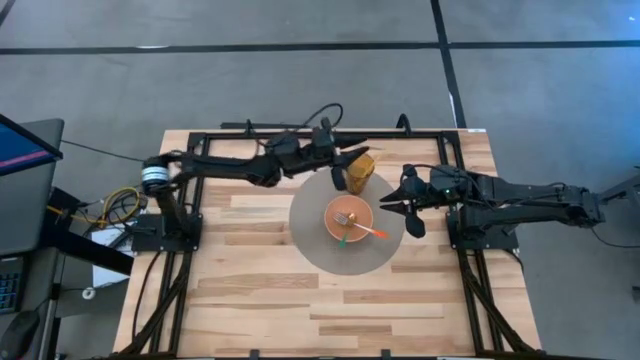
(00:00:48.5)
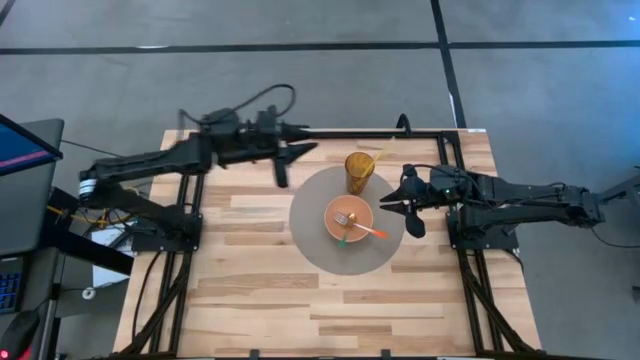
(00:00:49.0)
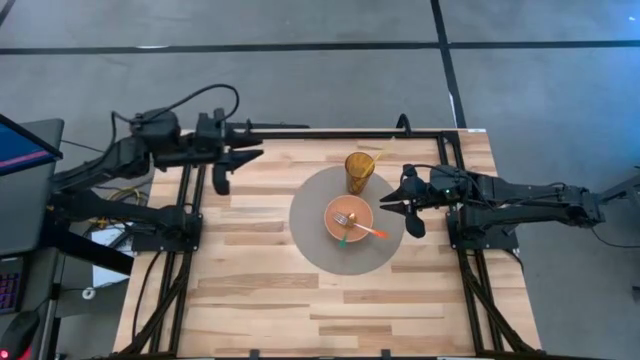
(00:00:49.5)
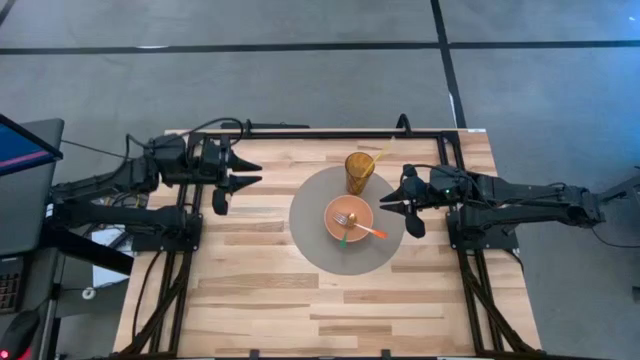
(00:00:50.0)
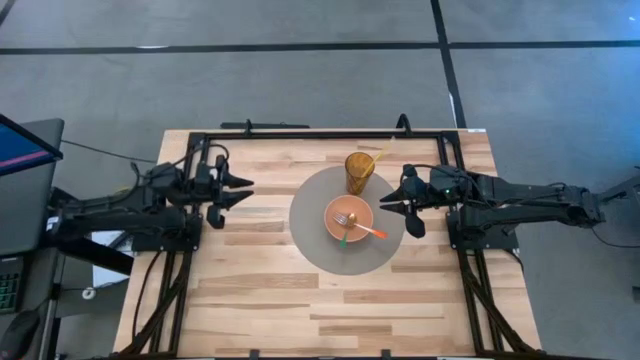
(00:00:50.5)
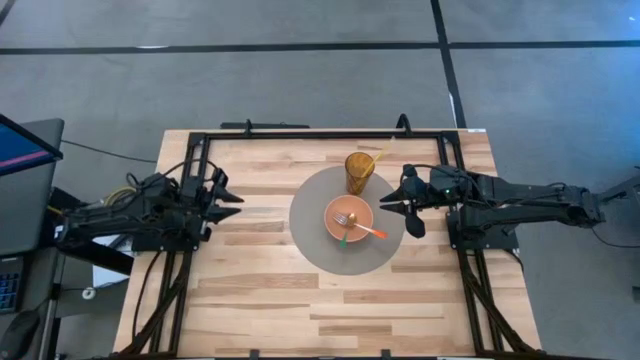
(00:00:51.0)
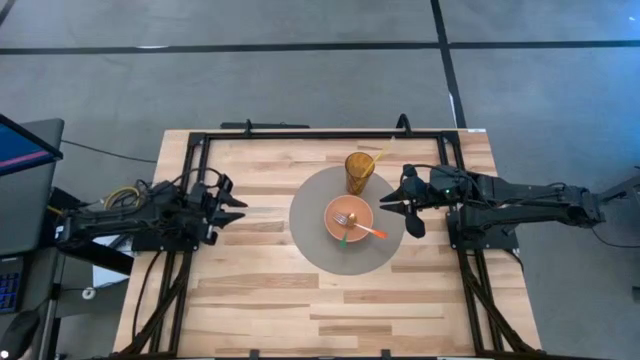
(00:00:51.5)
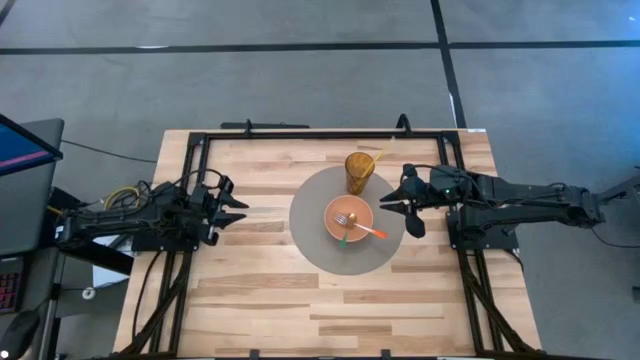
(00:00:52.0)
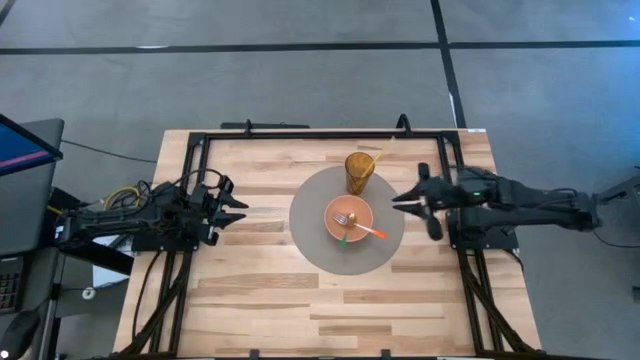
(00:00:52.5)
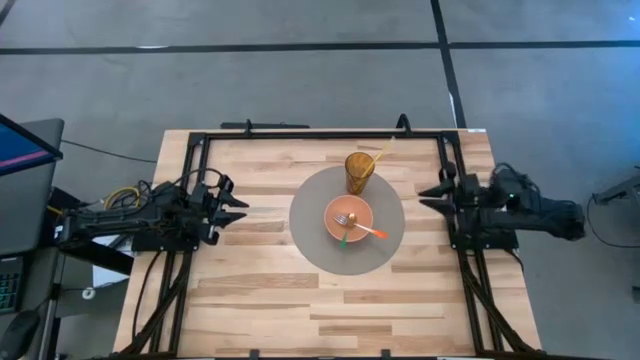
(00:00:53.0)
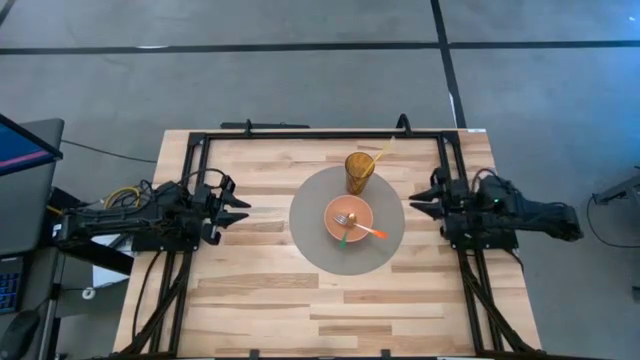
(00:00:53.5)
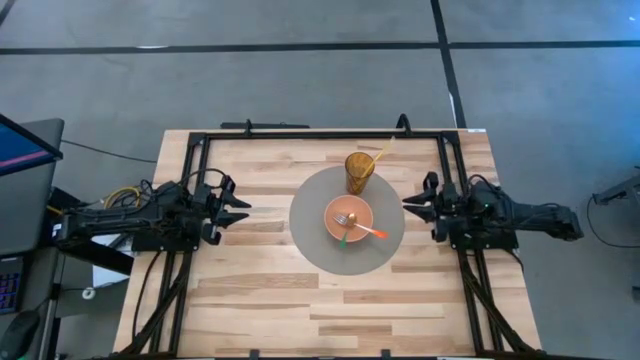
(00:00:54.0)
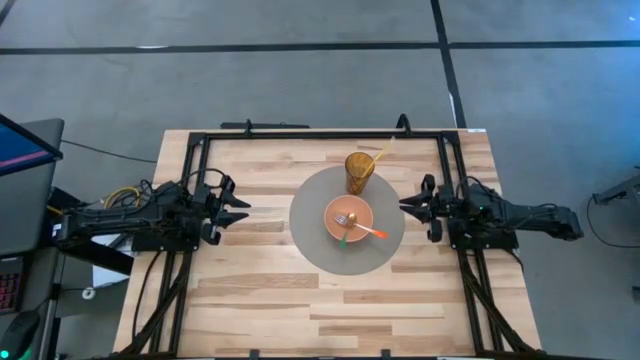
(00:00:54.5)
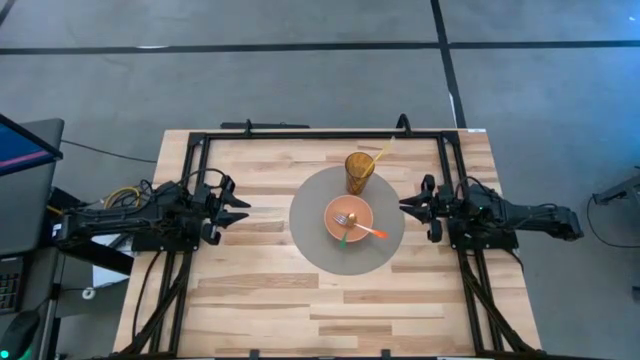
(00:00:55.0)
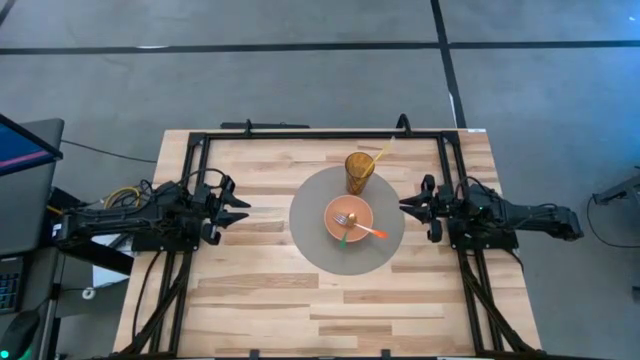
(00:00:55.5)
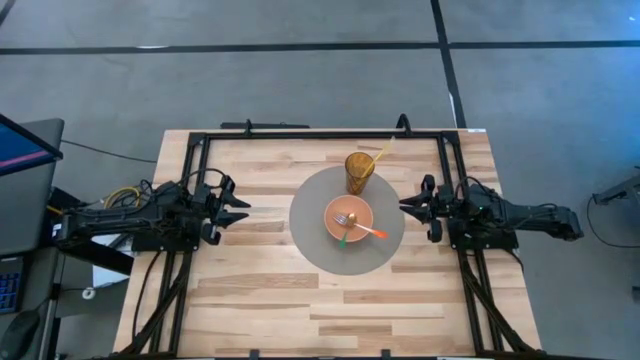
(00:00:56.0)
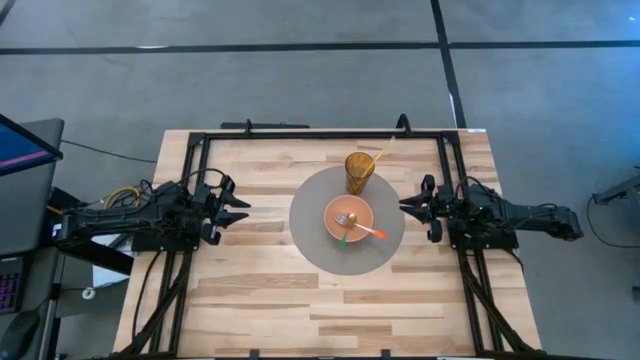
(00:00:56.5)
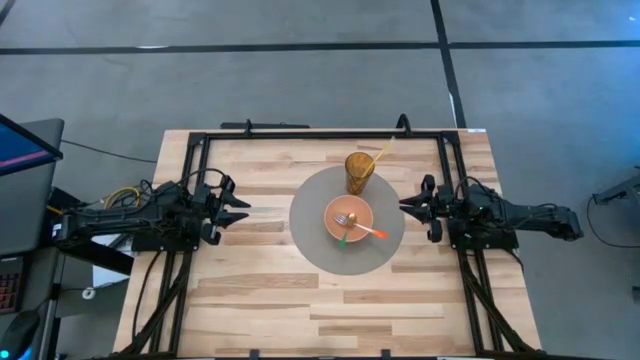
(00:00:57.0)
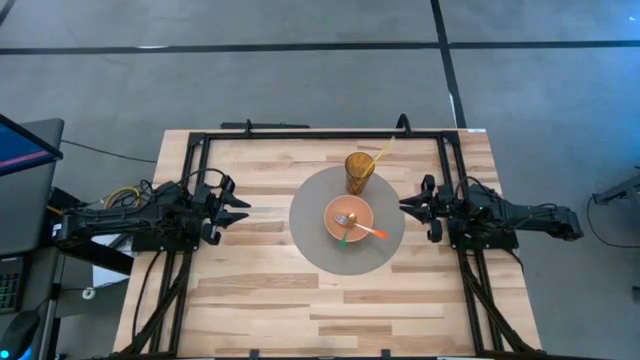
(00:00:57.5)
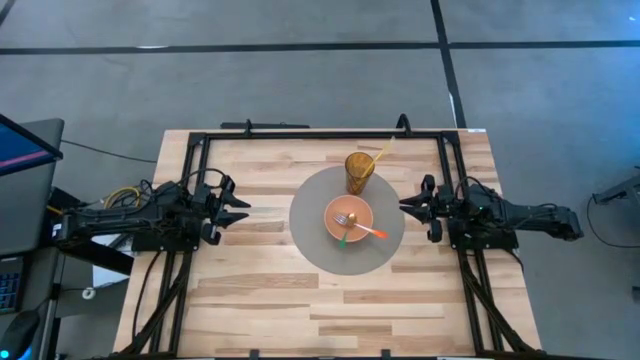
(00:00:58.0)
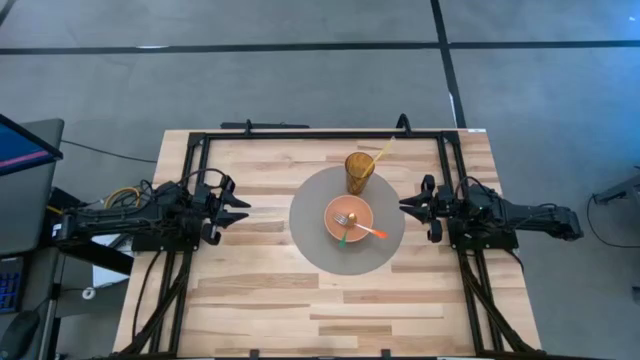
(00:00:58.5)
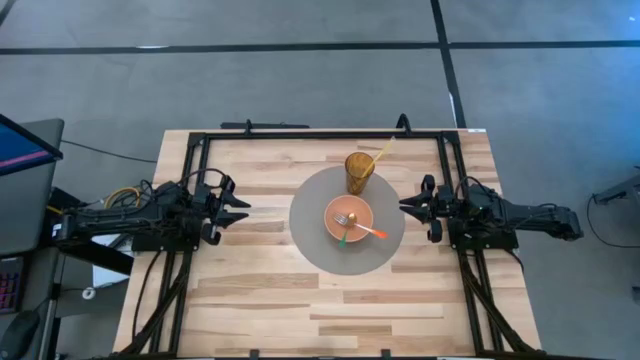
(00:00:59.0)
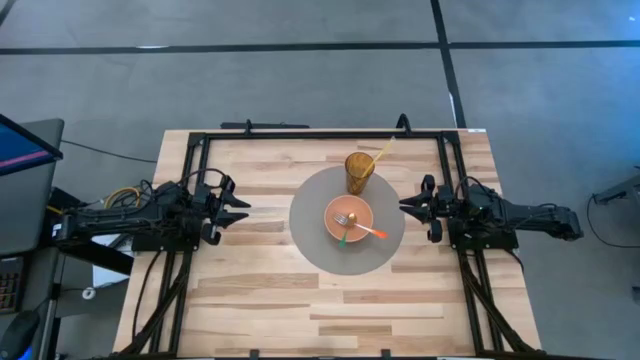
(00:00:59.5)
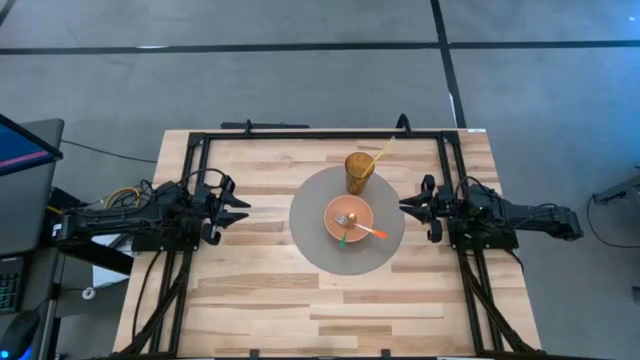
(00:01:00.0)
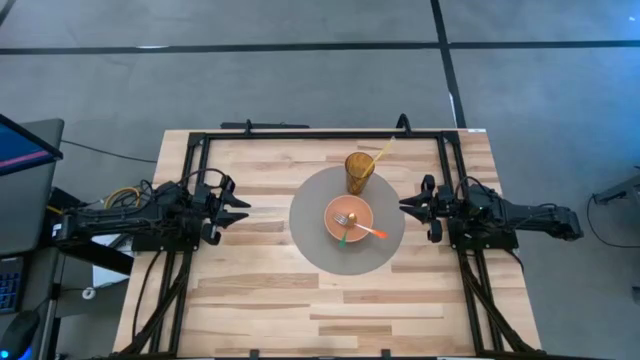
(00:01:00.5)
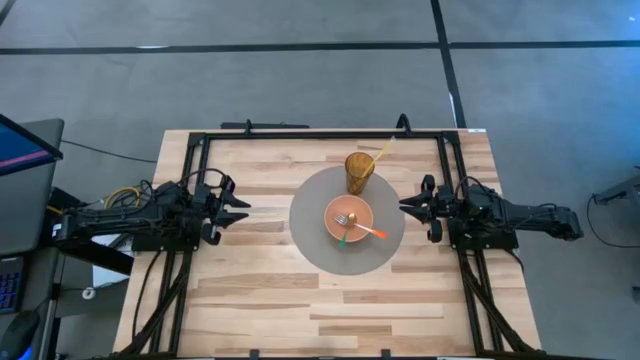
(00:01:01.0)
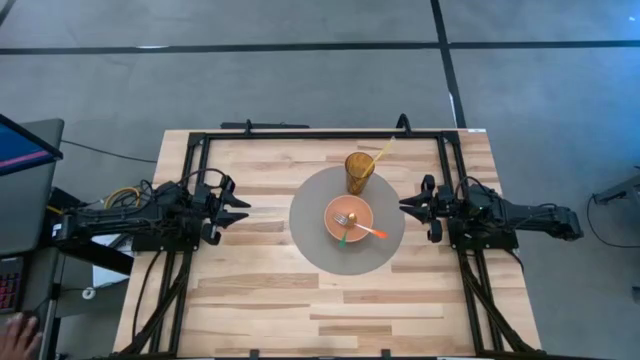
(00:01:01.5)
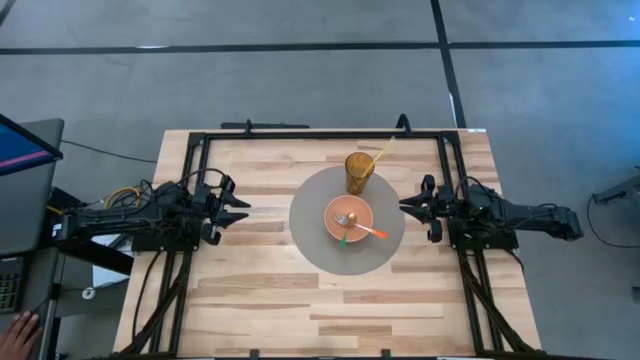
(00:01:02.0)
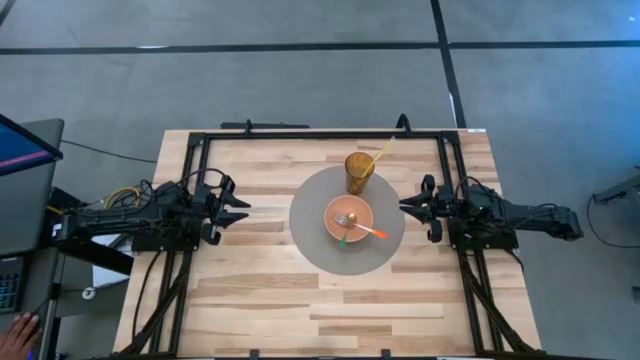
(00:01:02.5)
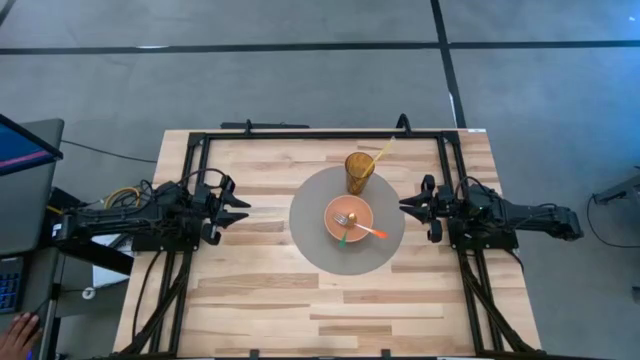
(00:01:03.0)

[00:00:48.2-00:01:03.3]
Task: Pick & Place Utensil
Return to Home Position

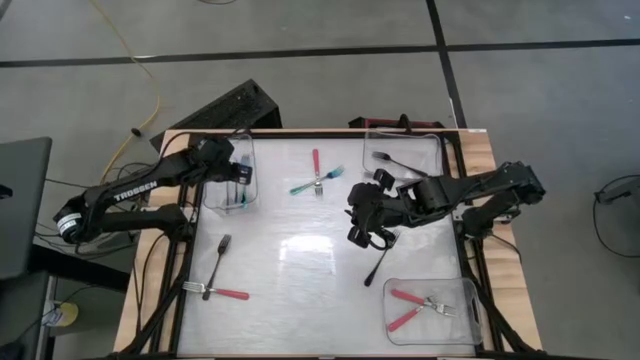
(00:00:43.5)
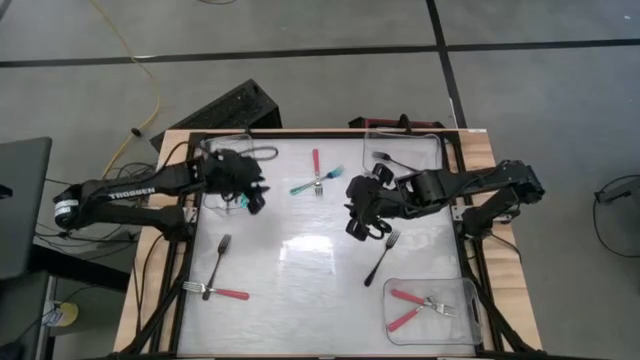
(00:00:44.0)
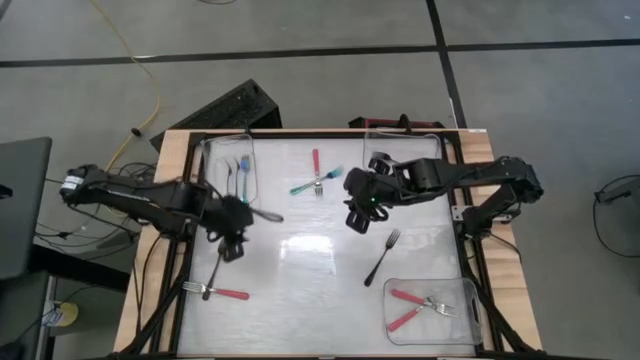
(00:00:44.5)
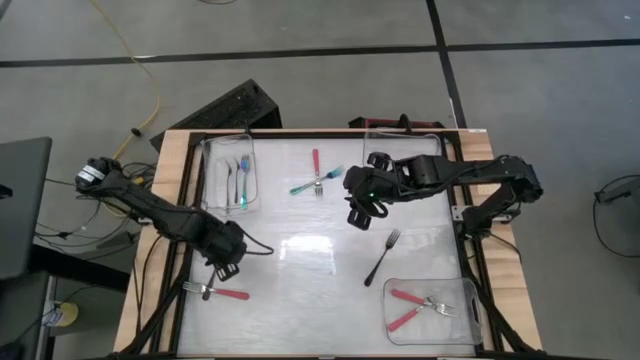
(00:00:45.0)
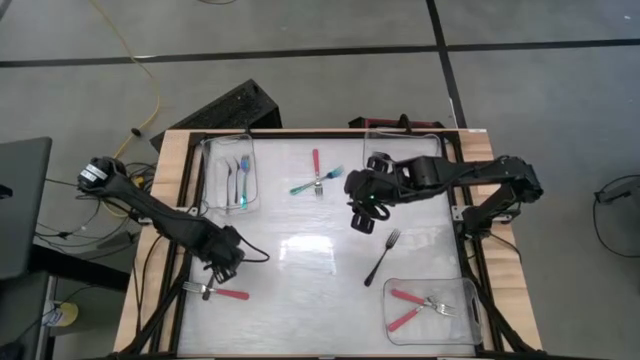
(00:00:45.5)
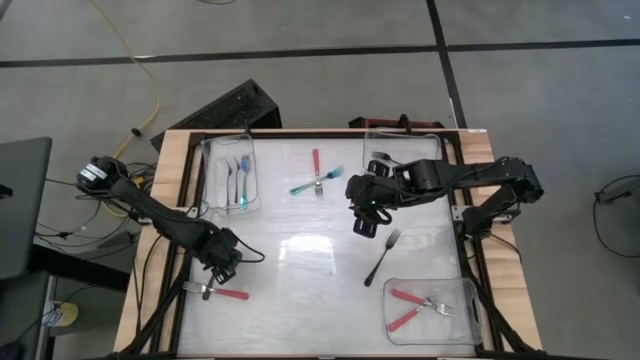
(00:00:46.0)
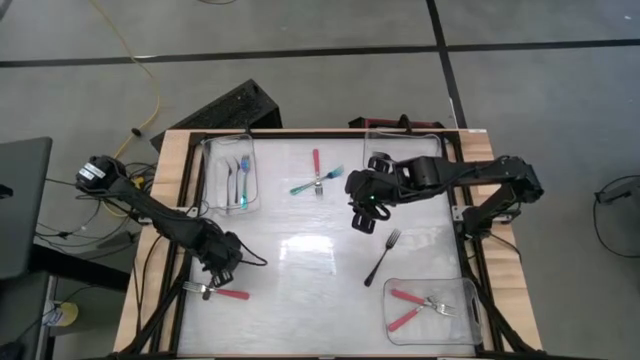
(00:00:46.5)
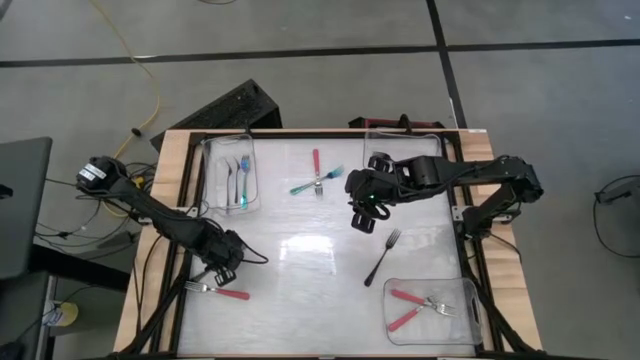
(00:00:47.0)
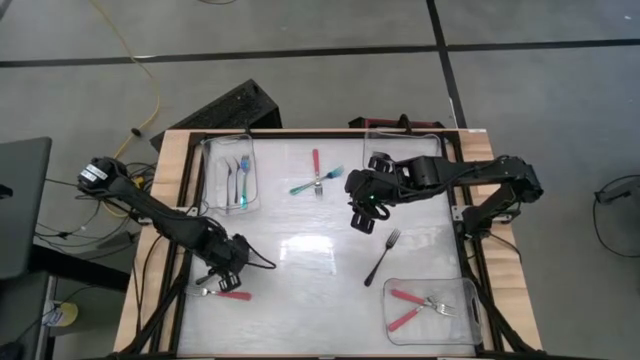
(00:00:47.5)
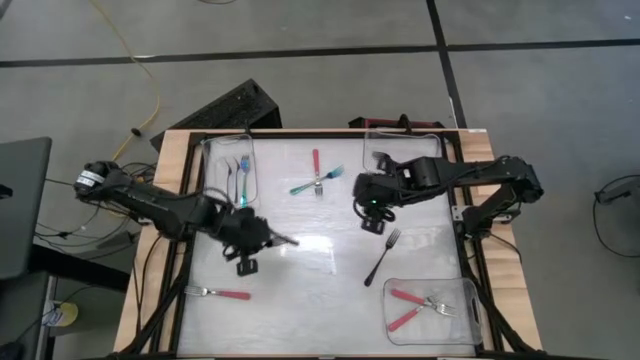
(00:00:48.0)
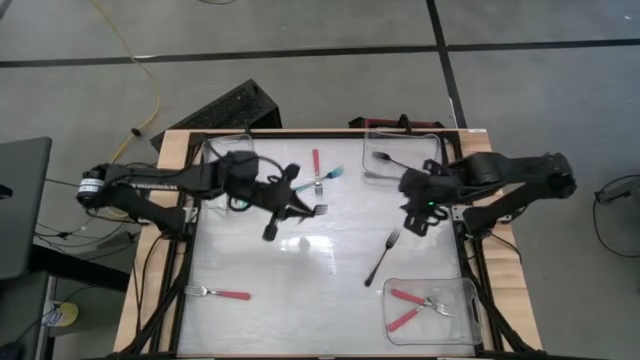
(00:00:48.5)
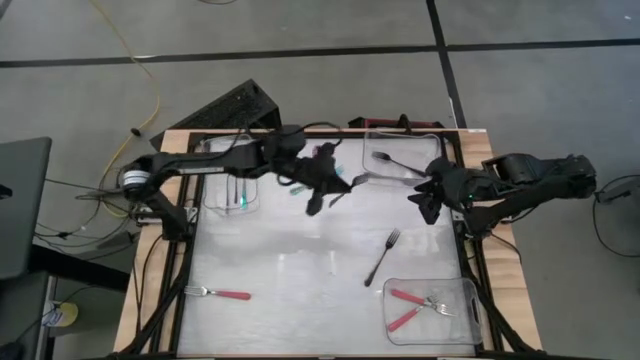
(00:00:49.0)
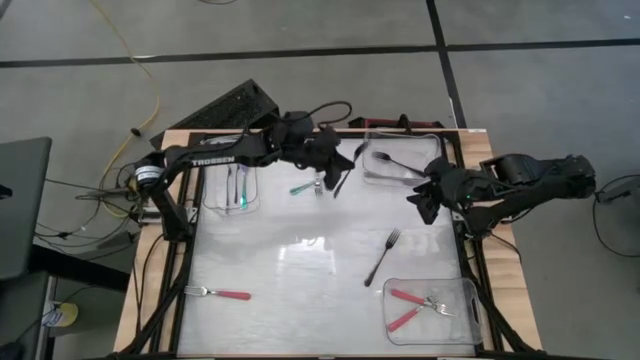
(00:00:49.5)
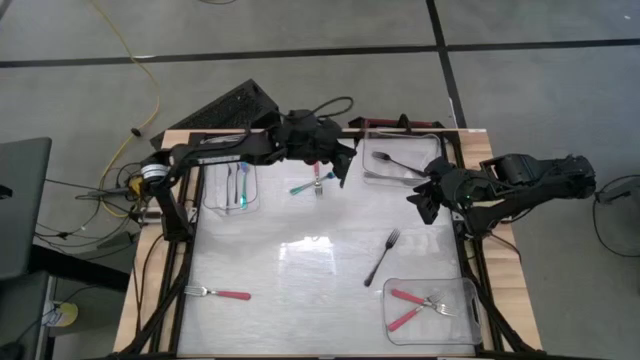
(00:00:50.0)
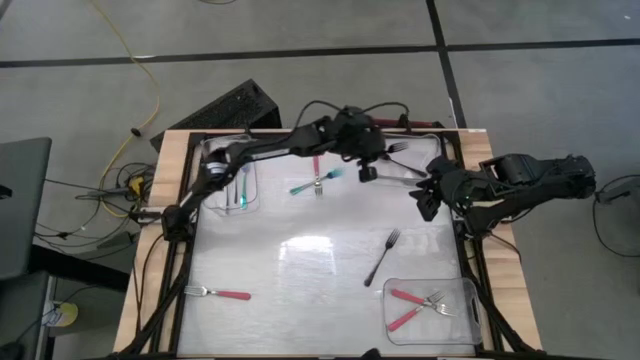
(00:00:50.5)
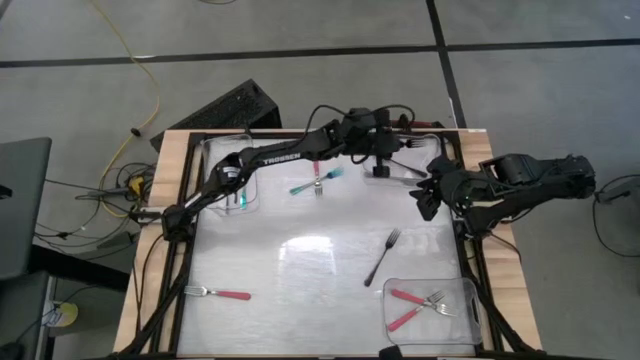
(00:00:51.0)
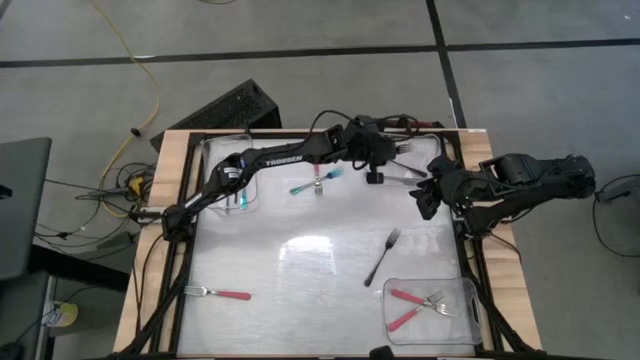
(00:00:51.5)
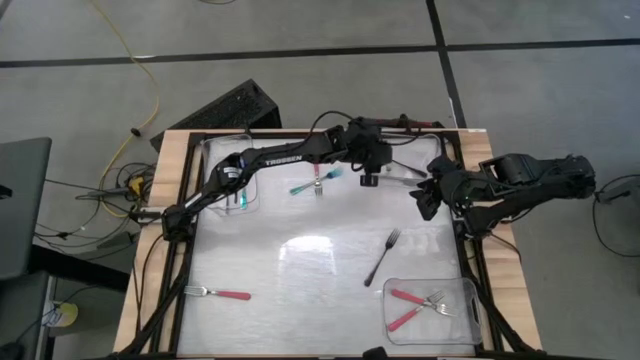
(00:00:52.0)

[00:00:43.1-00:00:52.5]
Task: Sort silverware by color (type)
Put the black fork into the top right transparent bin
